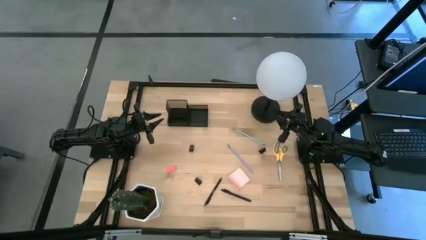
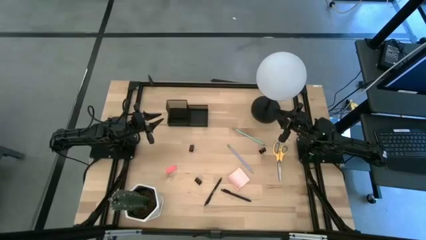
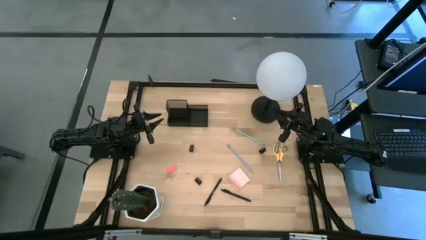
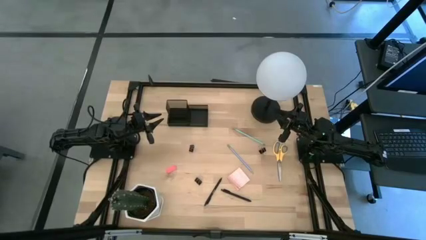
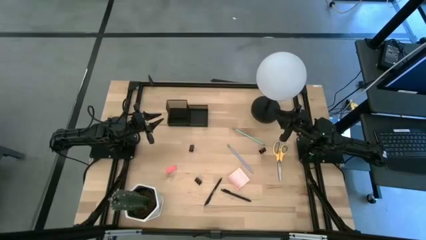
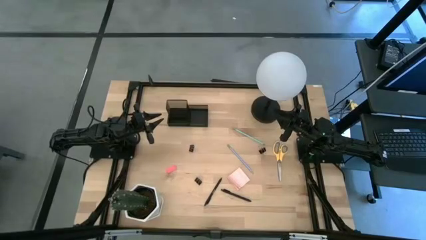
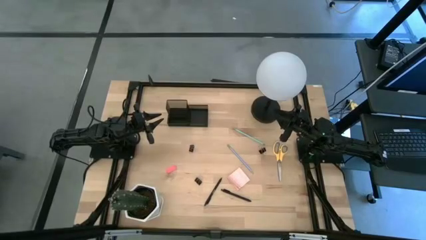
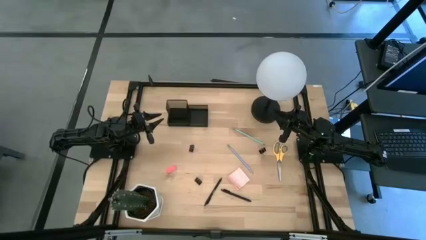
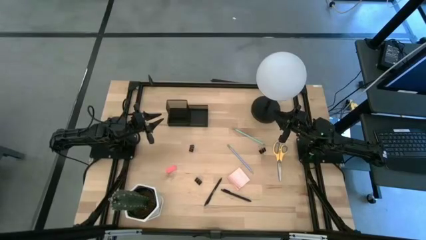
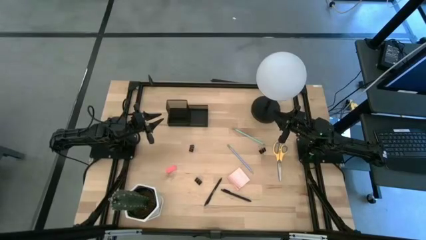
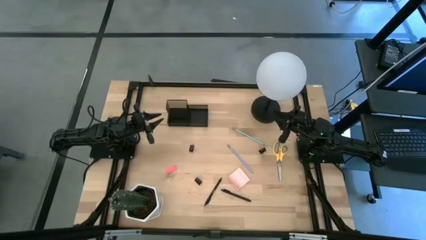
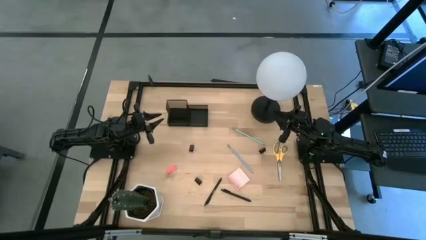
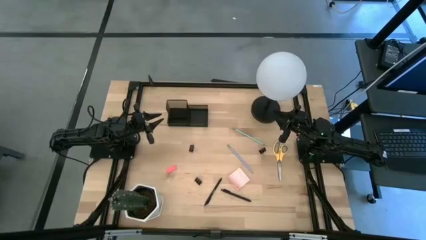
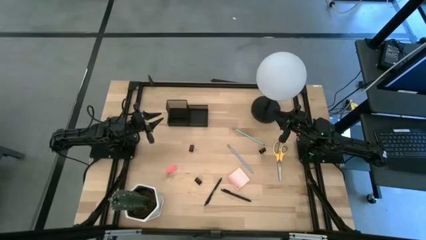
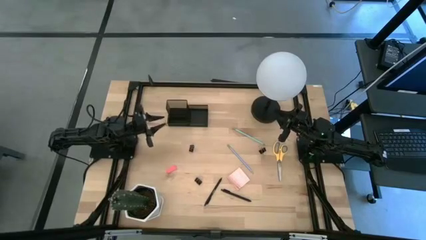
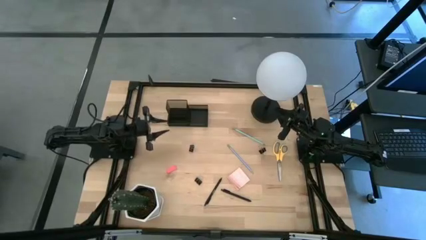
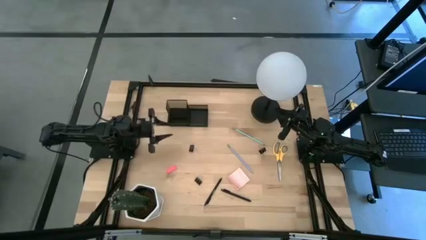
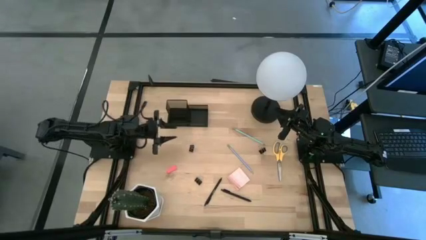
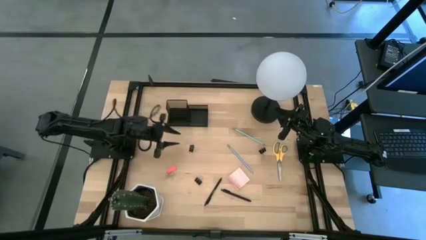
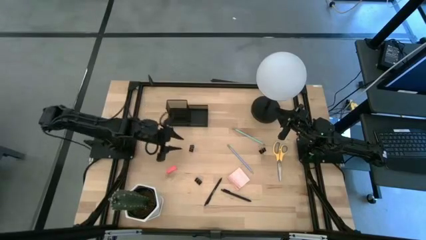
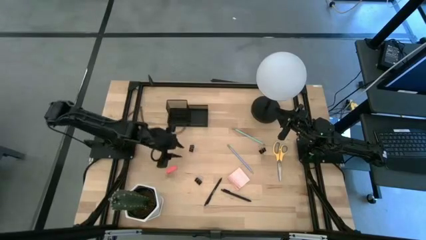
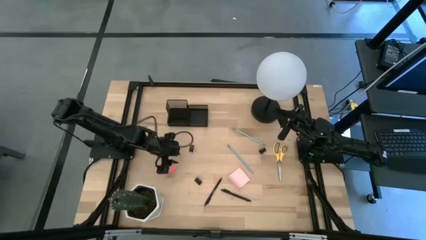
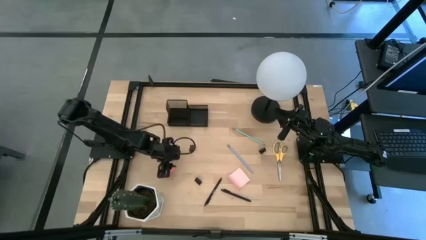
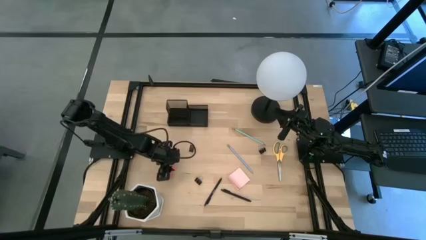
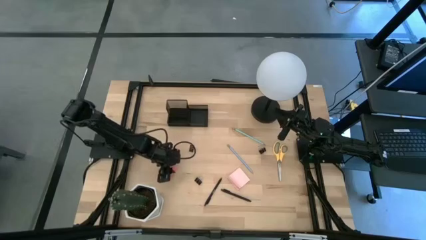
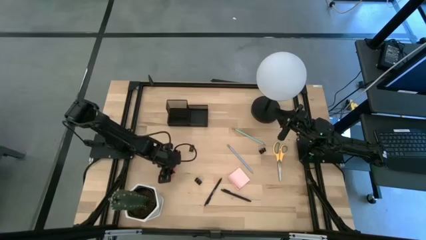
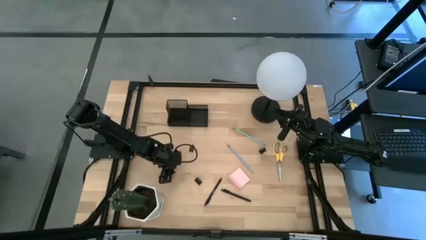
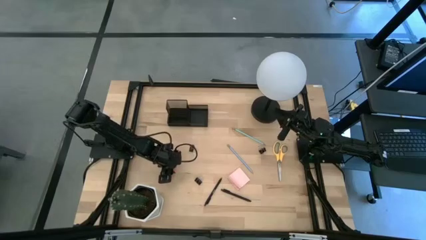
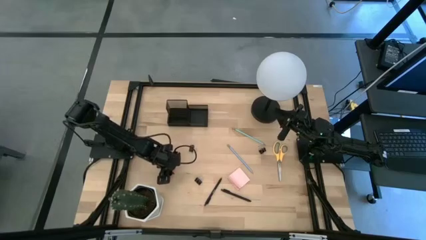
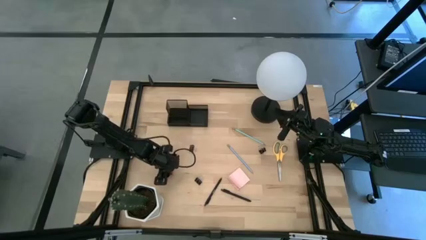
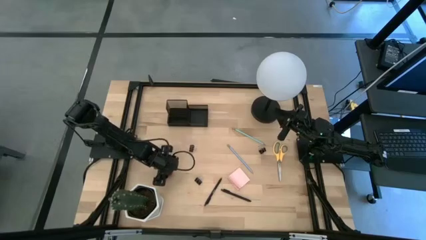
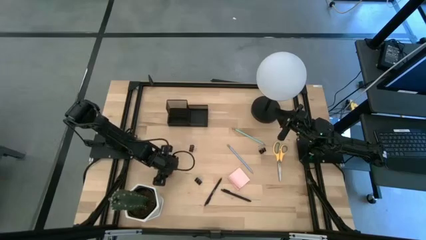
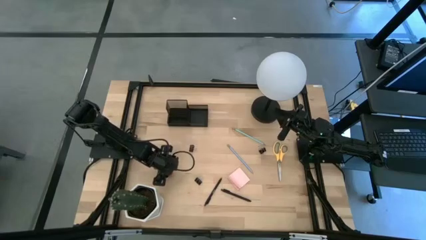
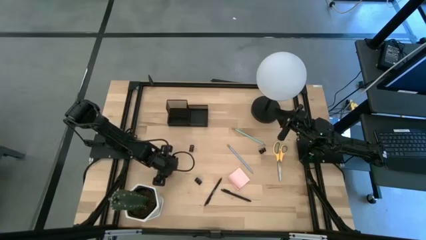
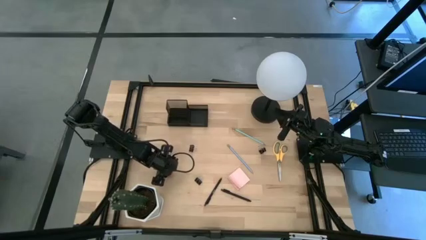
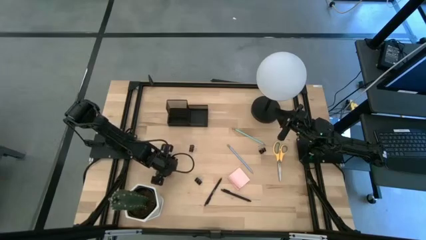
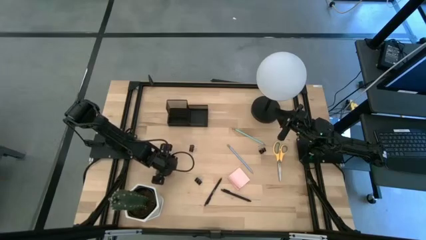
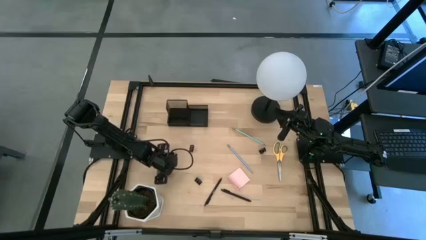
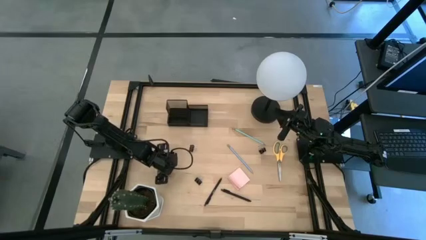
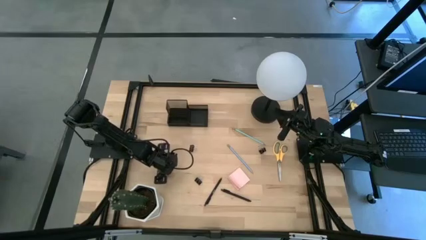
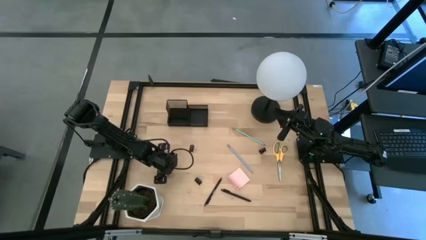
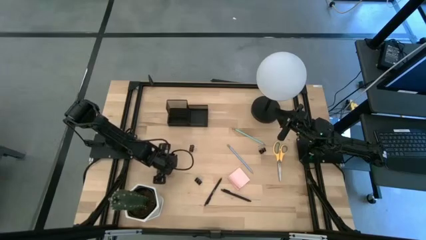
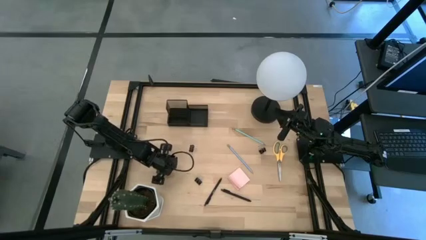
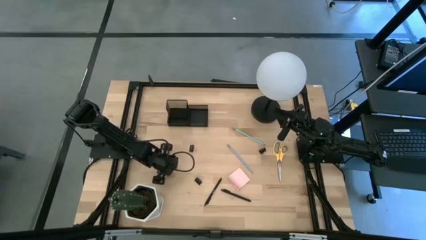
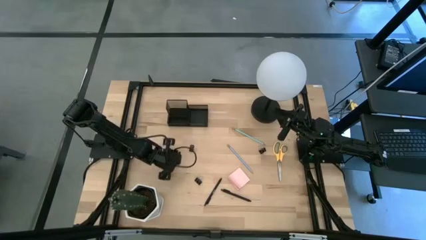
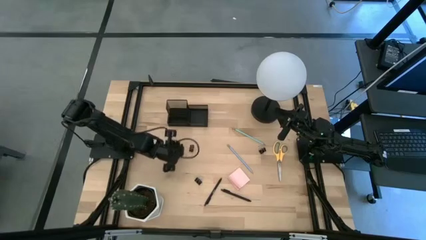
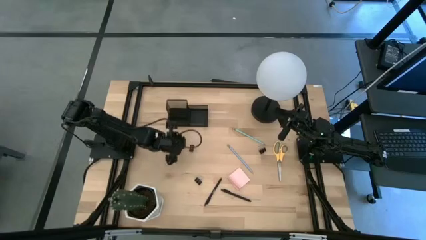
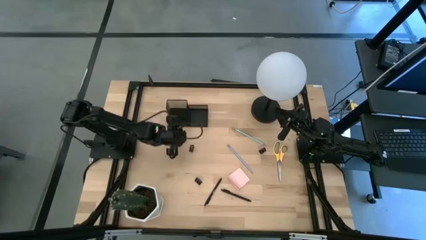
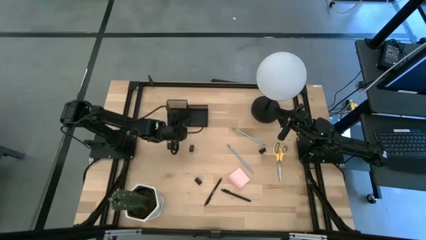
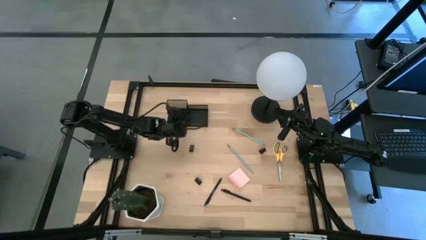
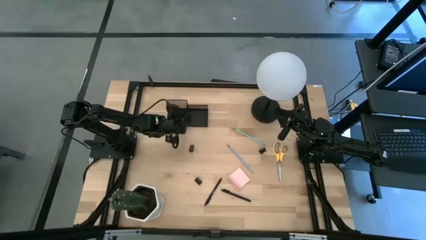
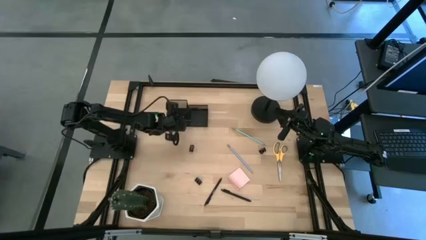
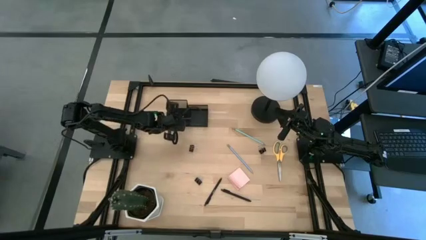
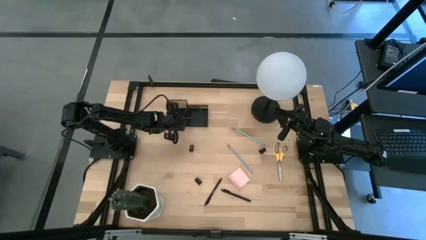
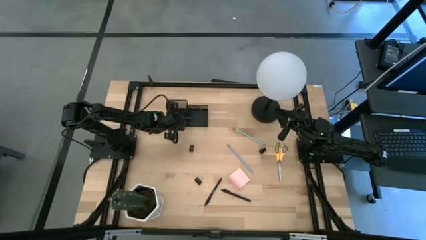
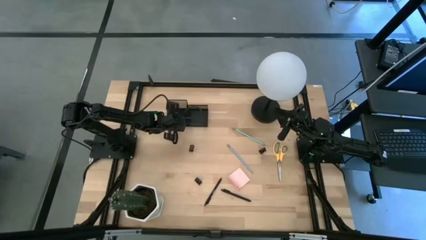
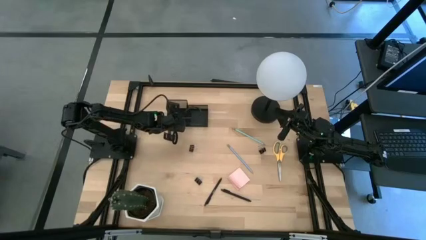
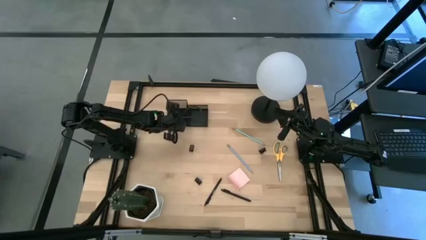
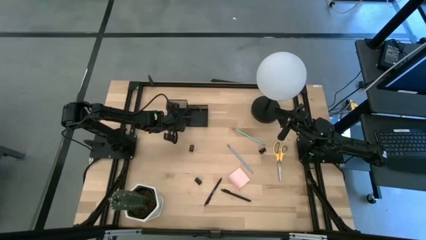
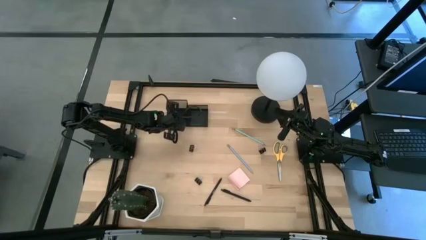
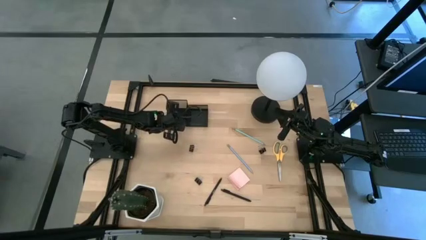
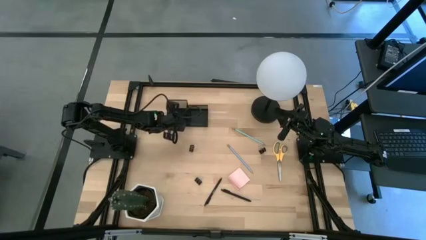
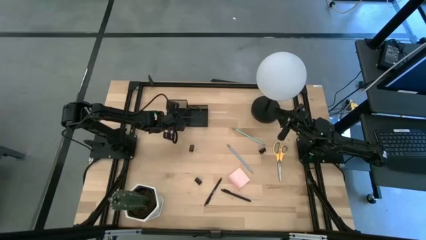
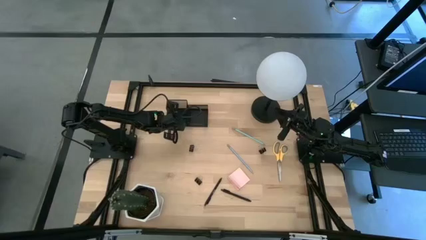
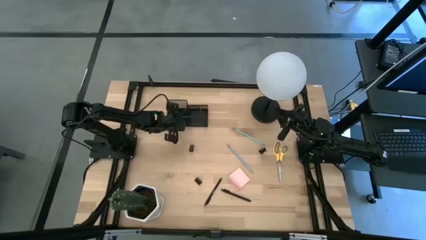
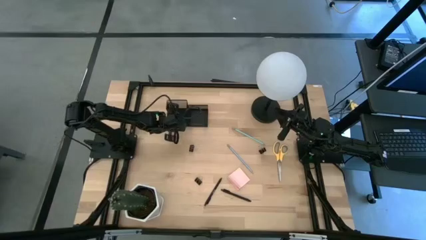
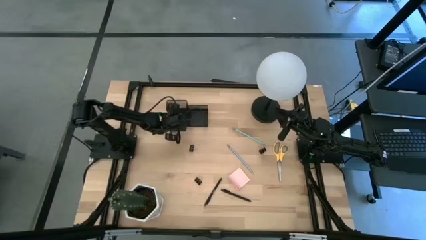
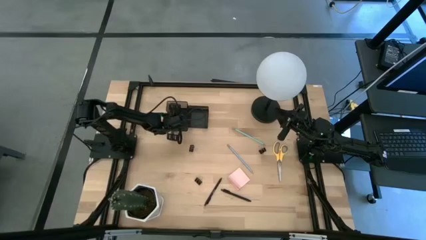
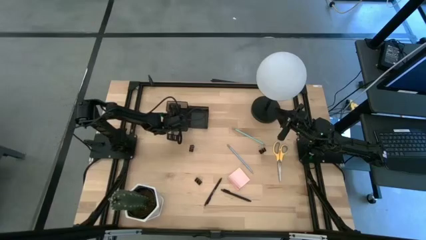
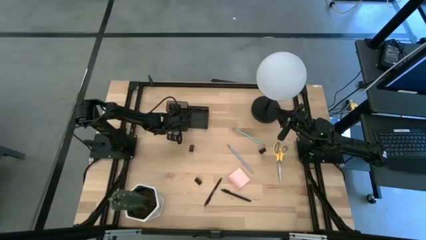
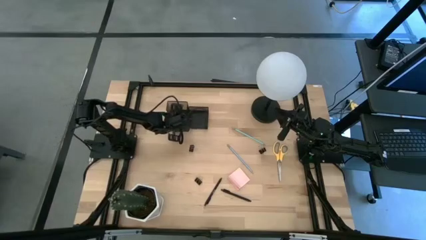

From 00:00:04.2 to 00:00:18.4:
Task: Pick and place office supplies into organizer
Put the pink eraser into the desk organizer

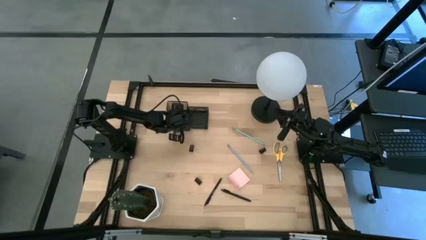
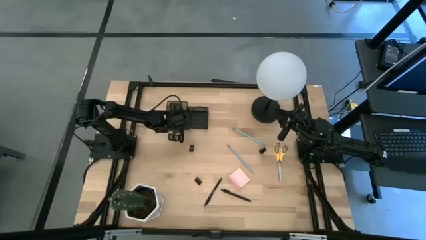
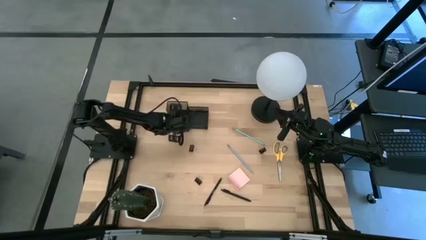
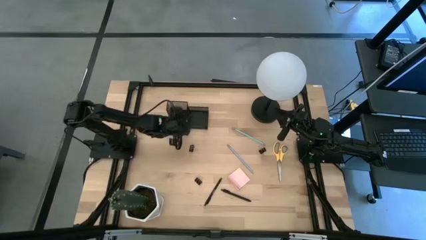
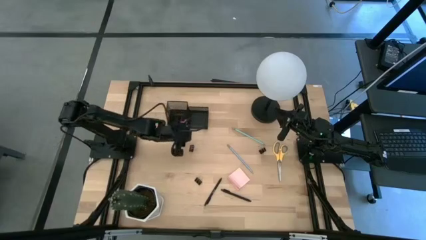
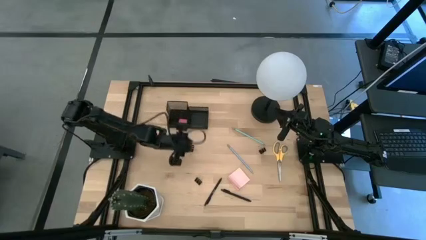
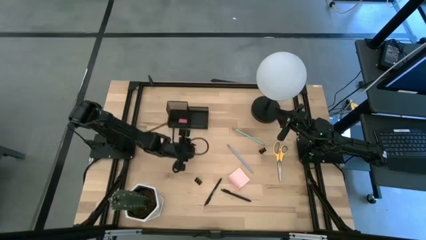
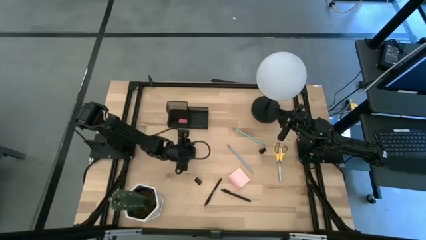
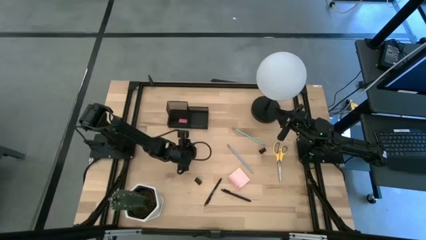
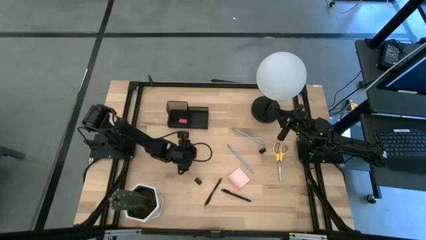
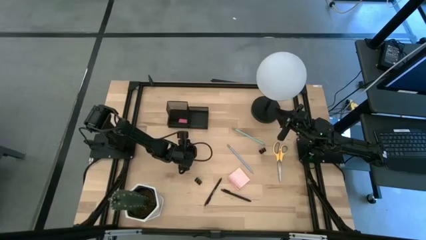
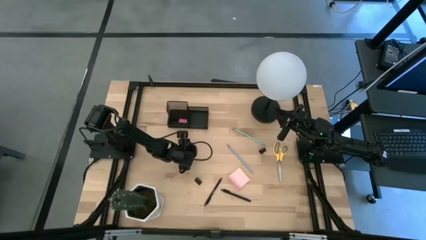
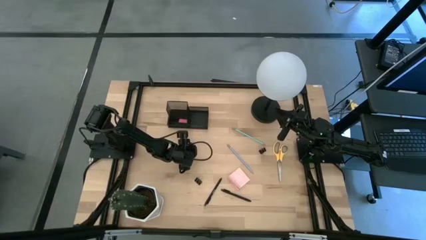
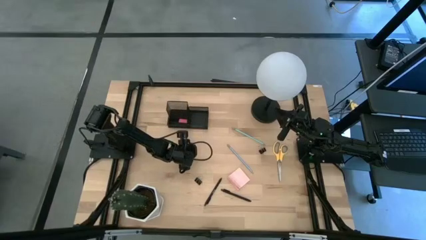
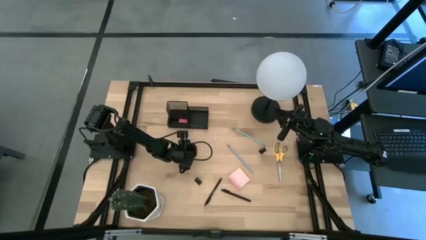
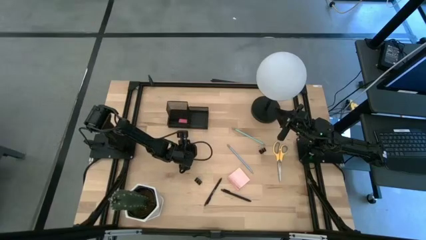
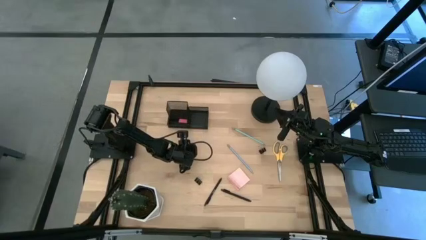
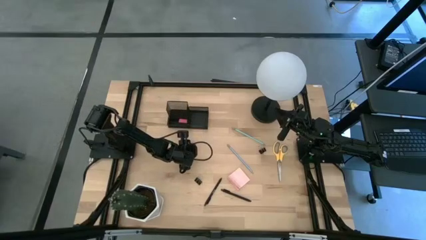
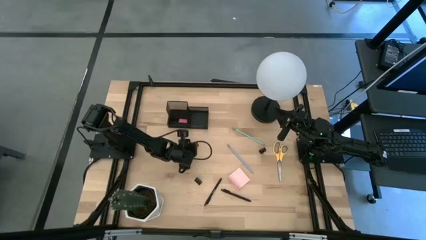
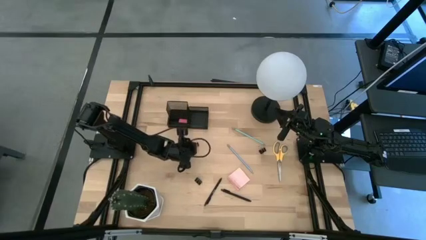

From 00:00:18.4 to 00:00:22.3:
Put the top left binder clip into the desk organizer
